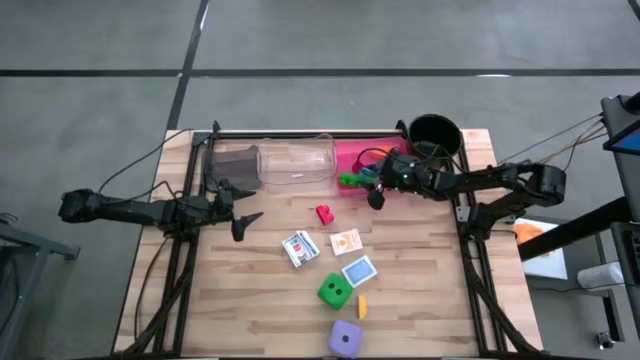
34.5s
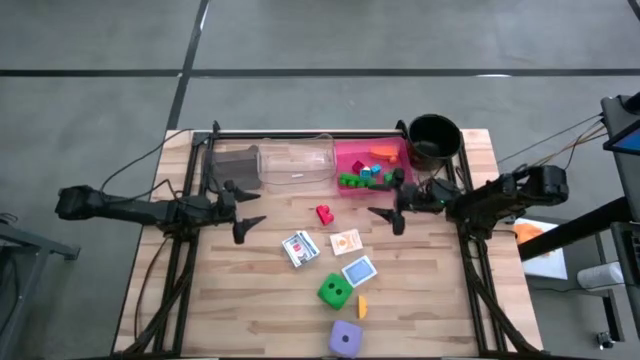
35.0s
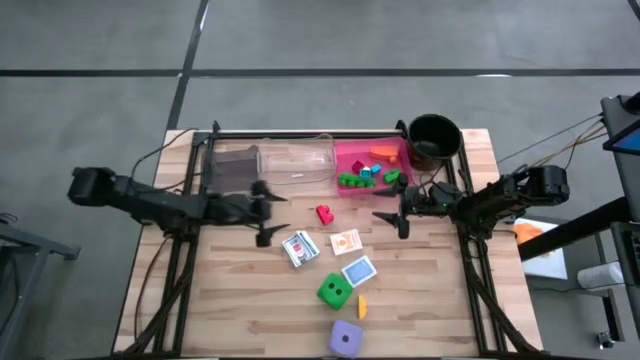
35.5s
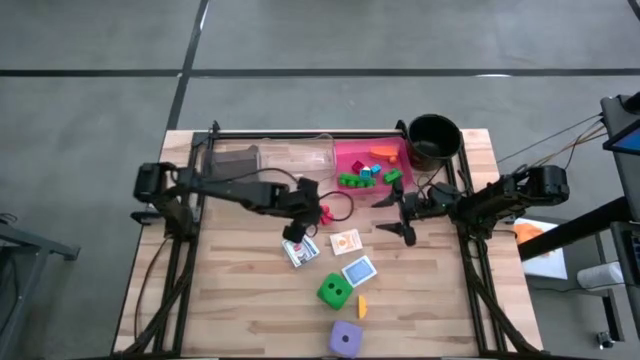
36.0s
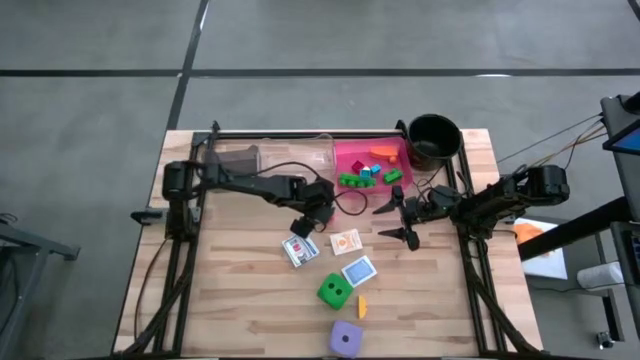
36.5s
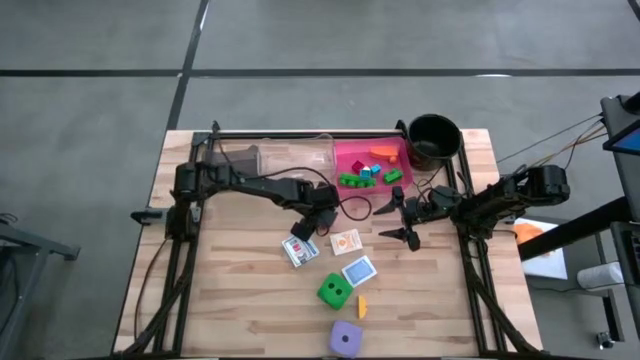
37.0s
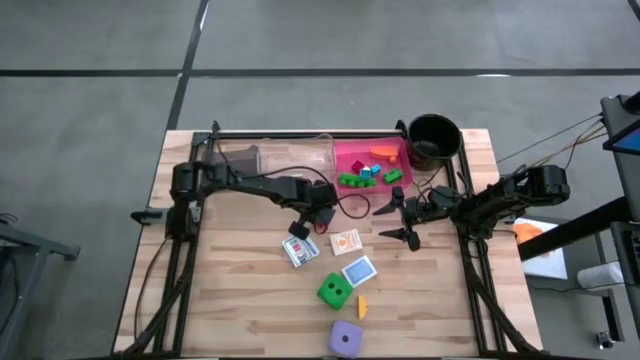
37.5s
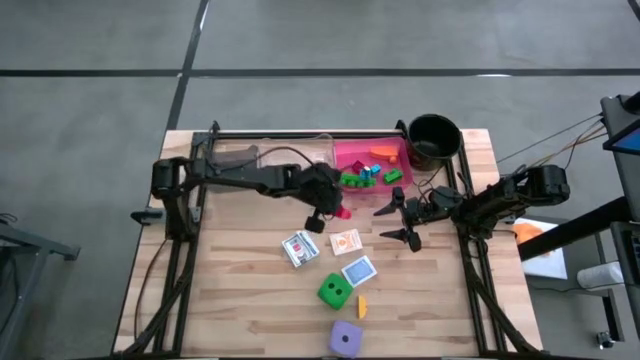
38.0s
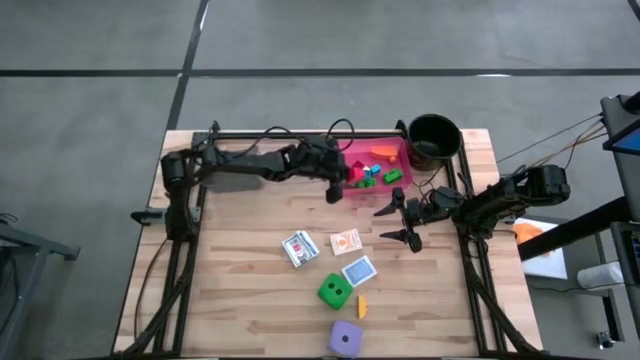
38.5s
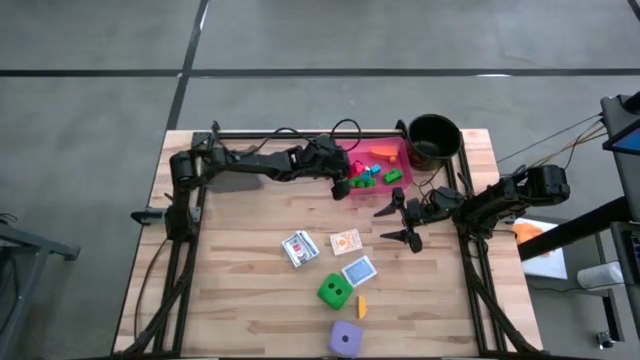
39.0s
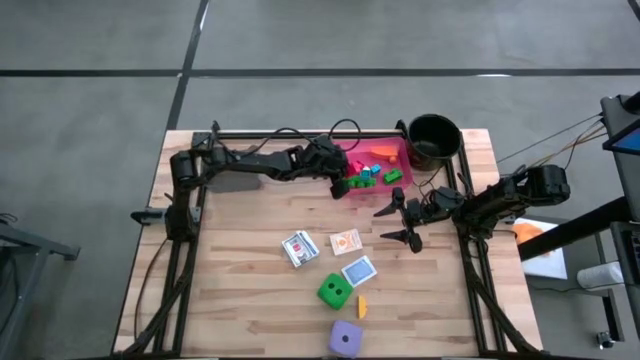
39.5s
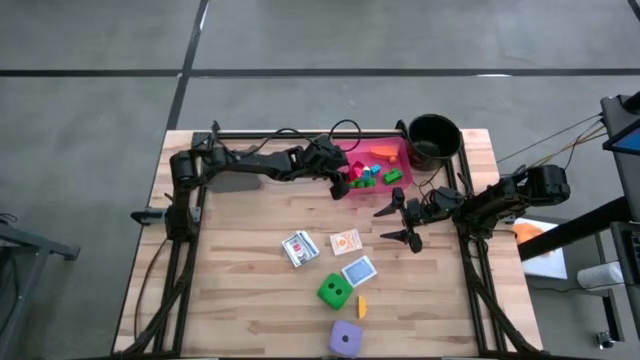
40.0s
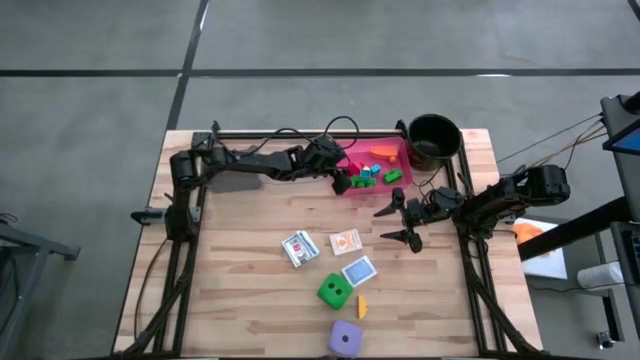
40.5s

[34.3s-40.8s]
Task: Pick & Place Toys
Put the red game piece into the pink bin

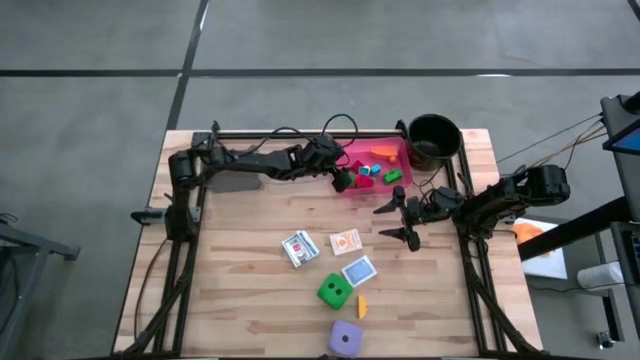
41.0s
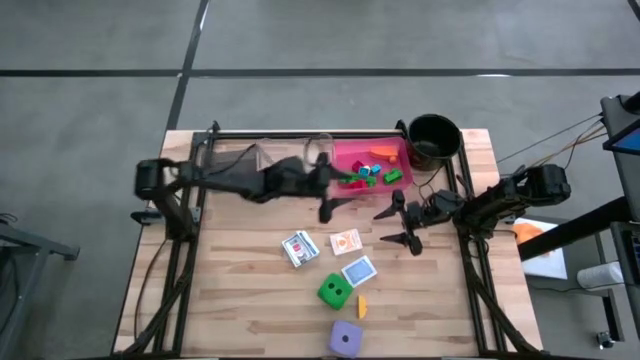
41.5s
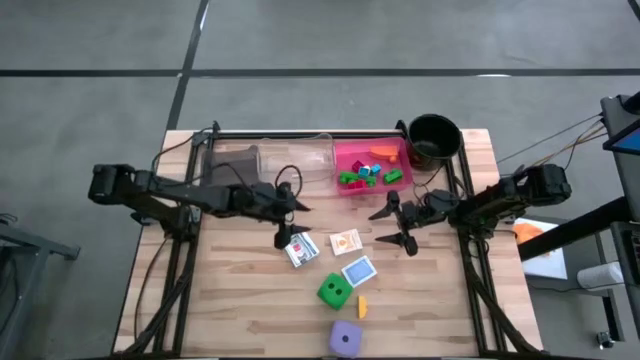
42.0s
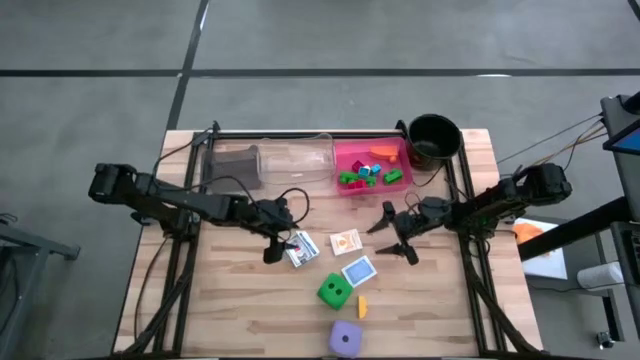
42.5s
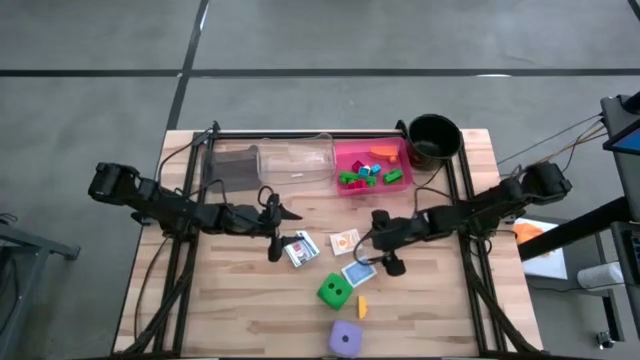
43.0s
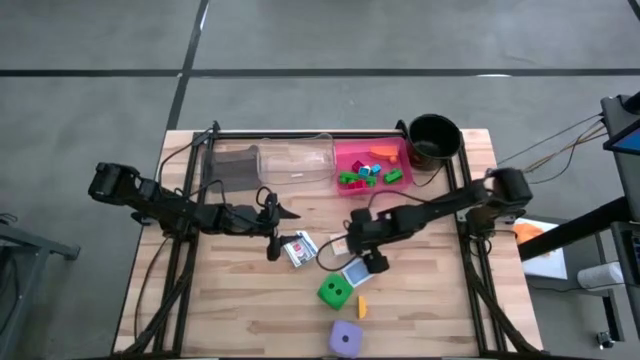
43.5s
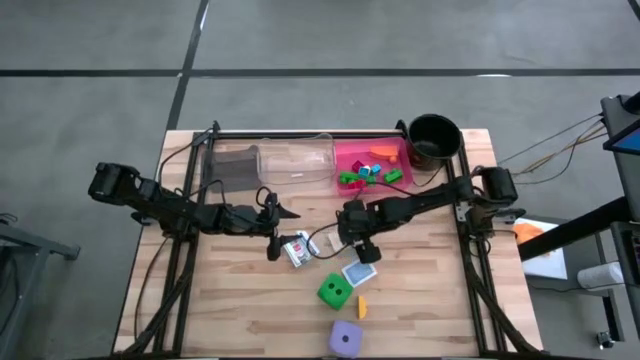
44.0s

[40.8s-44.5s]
Put the yellow game card into the transparent bin

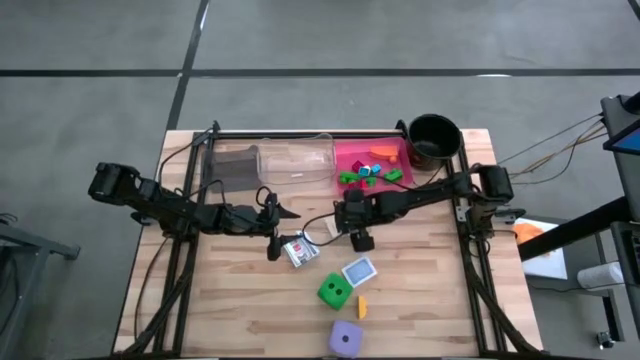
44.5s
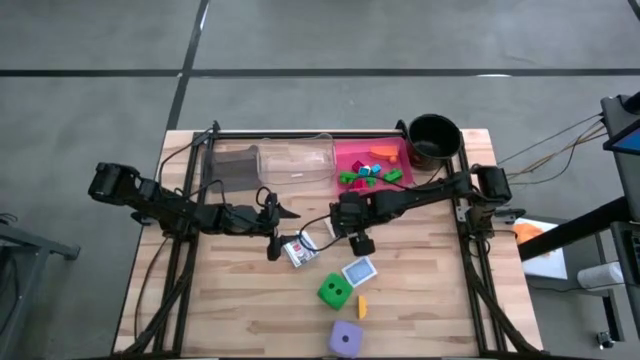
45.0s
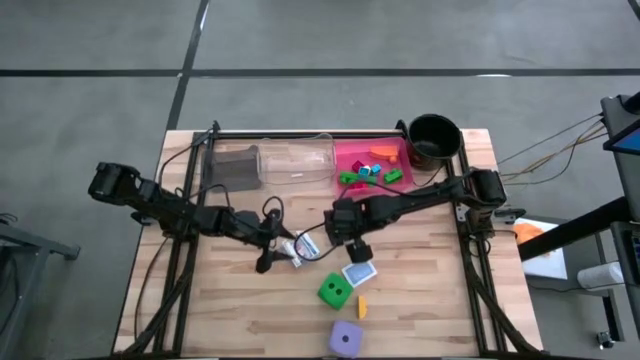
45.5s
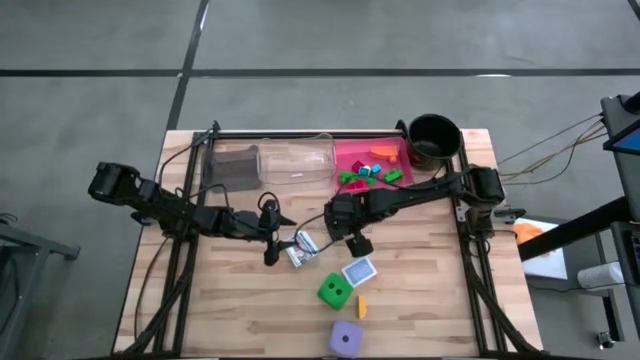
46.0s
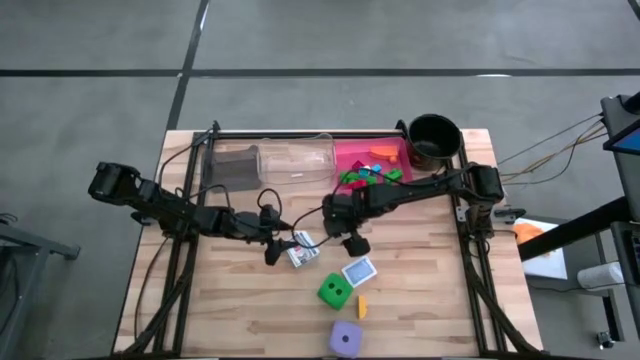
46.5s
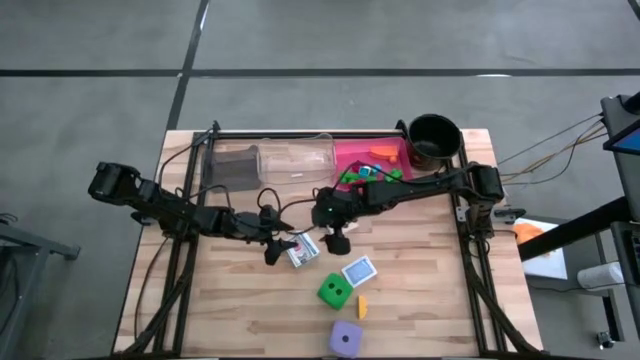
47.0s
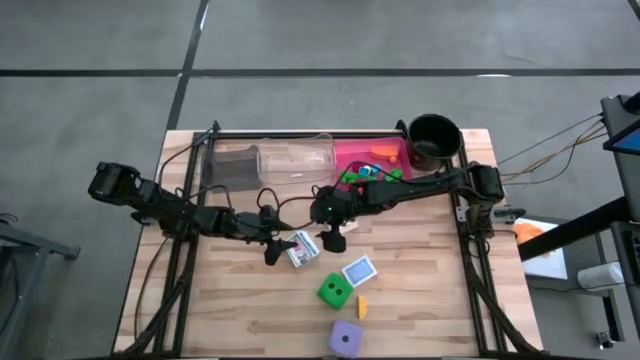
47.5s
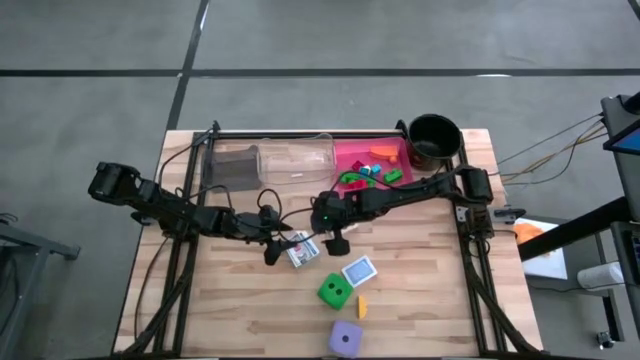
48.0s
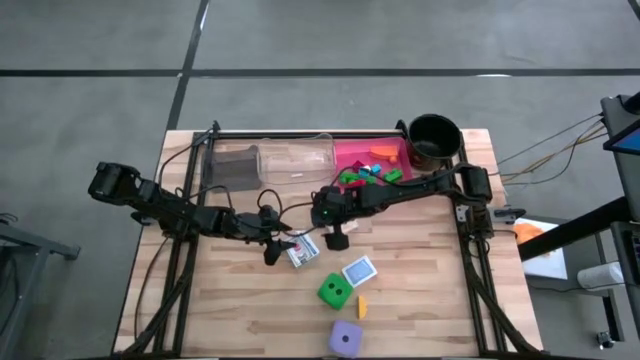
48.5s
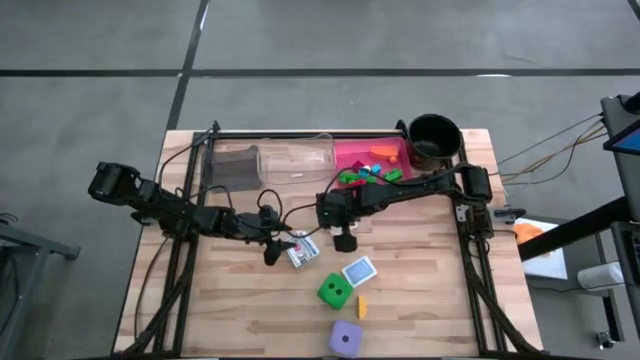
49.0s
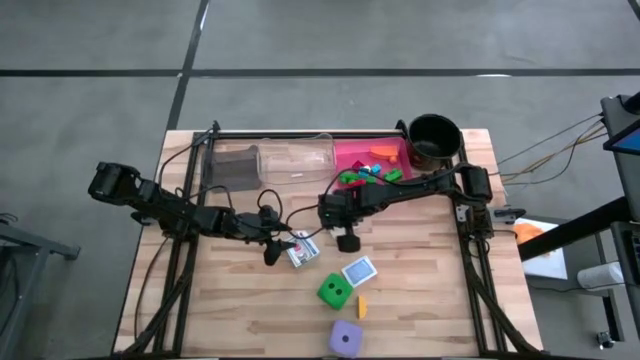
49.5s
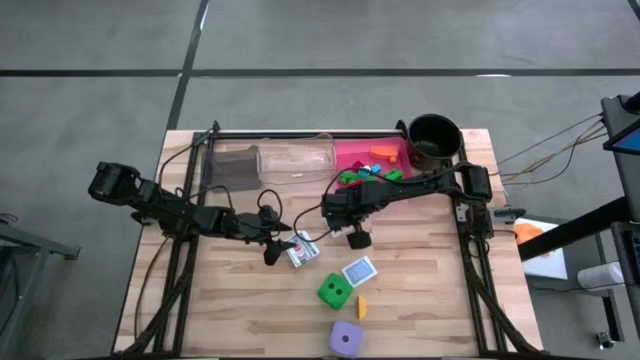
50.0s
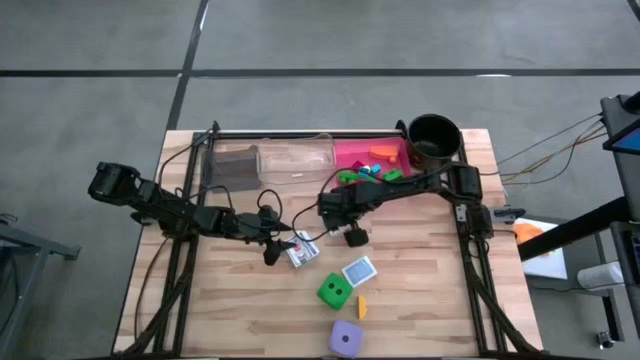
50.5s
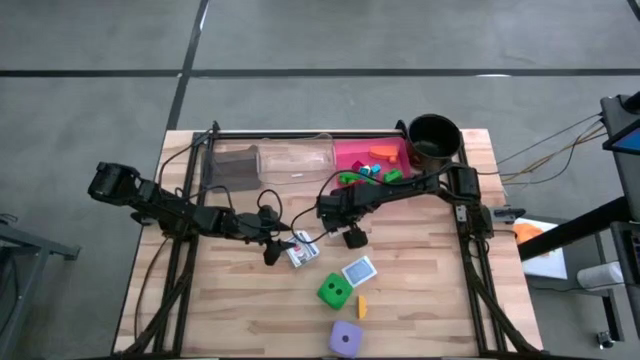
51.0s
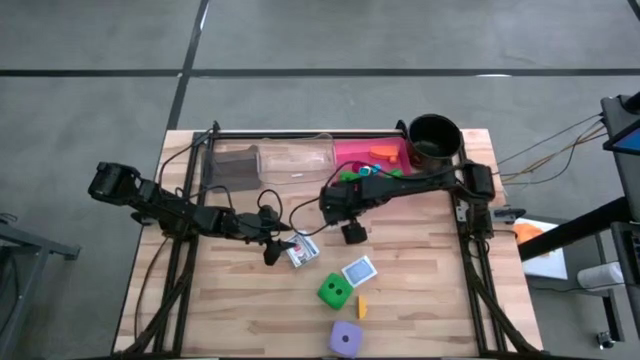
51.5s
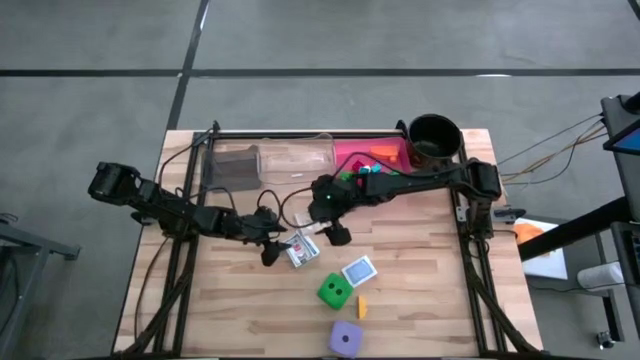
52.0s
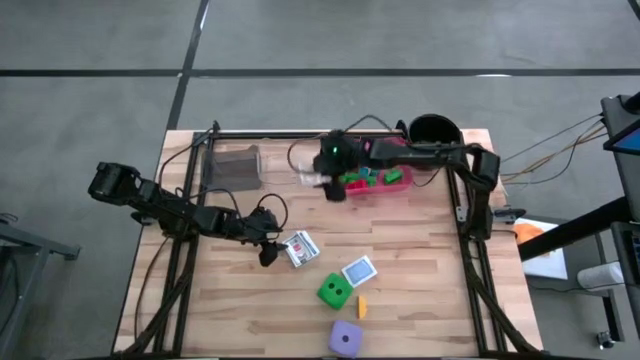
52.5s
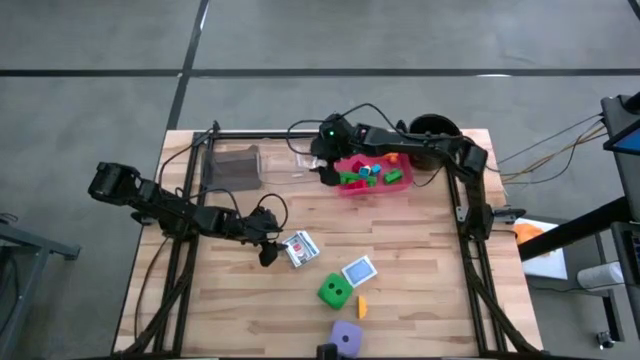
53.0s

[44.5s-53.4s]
Put the yellow game card into the transparent bin

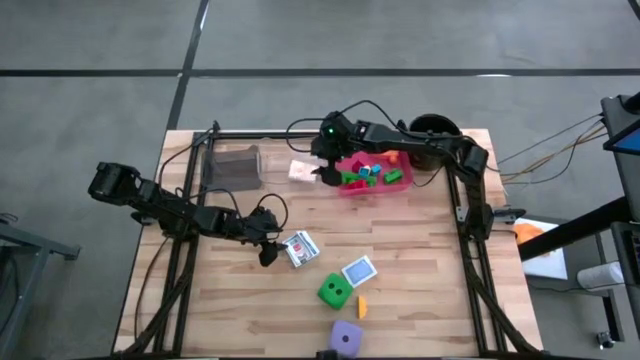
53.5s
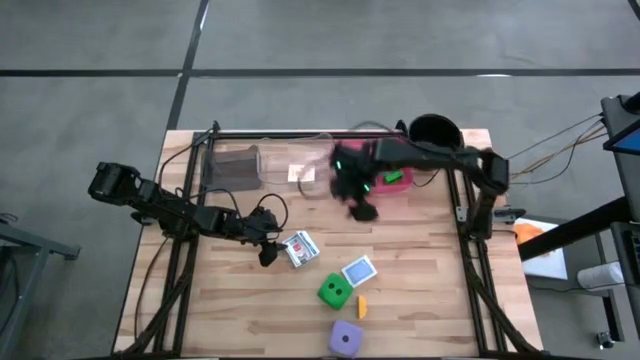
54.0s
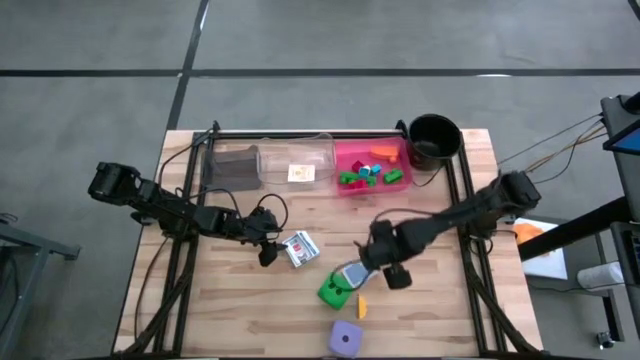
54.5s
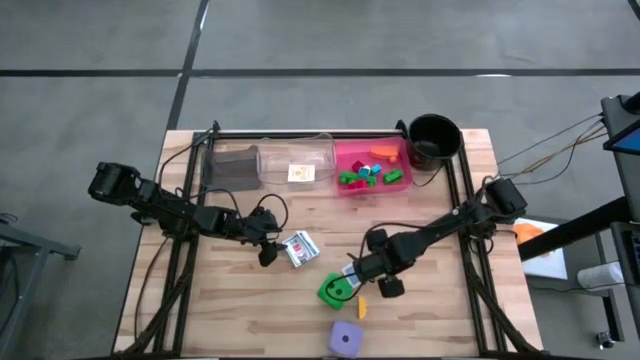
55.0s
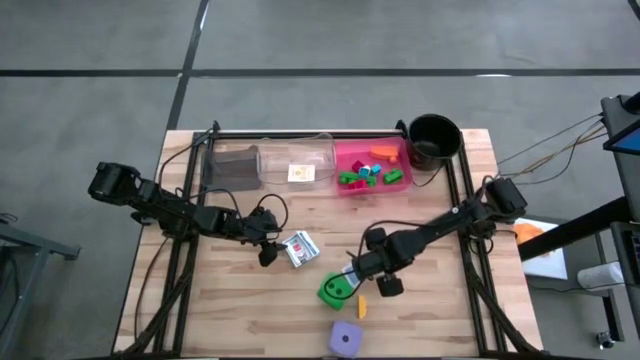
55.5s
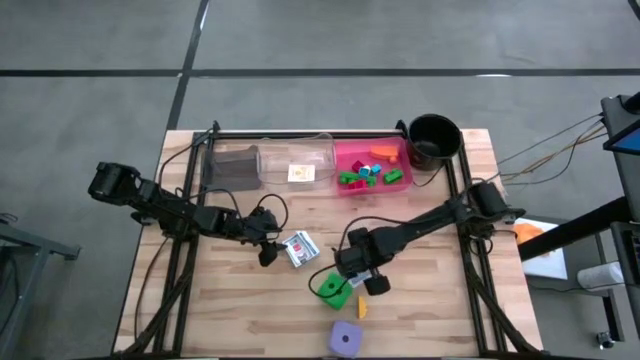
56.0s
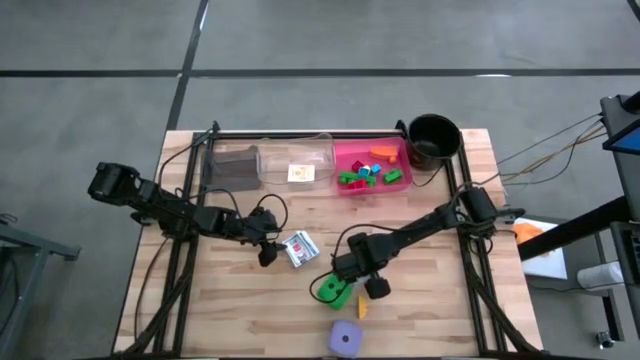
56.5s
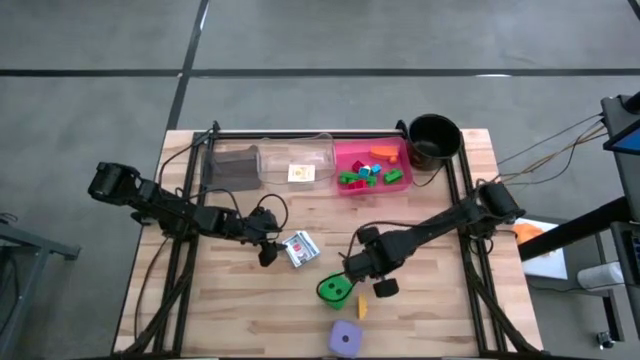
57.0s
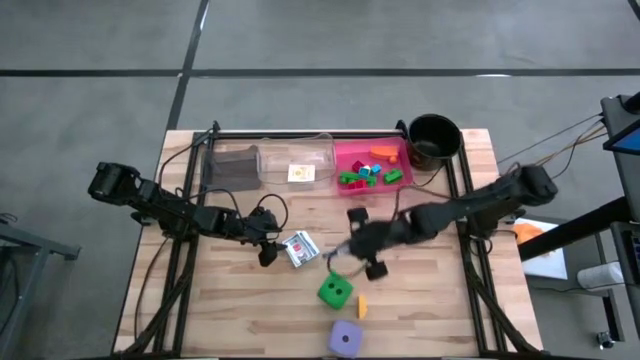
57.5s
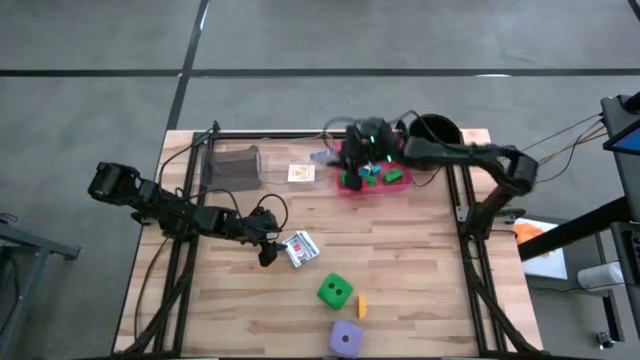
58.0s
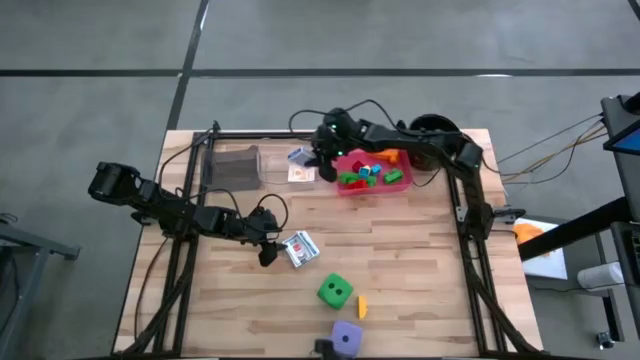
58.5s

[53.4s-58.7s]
Put the blue game card into the transparent bin
